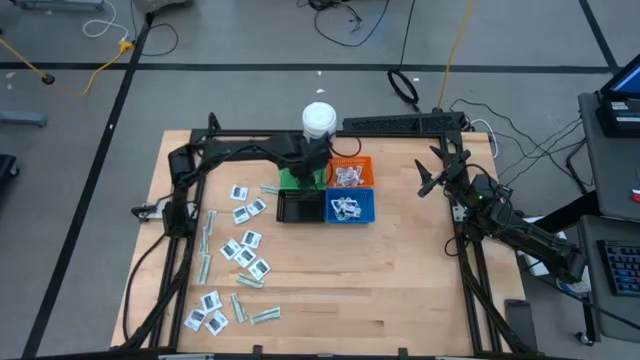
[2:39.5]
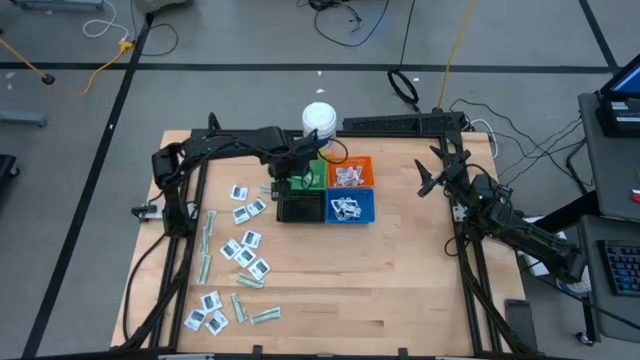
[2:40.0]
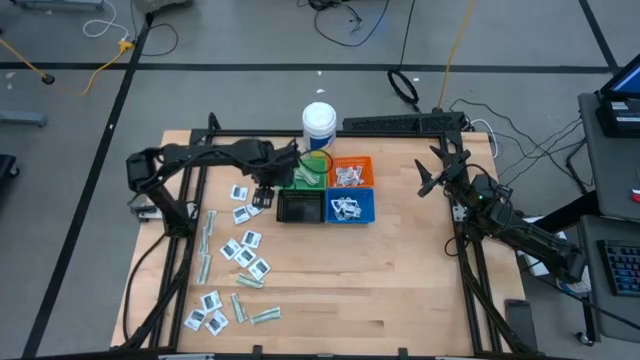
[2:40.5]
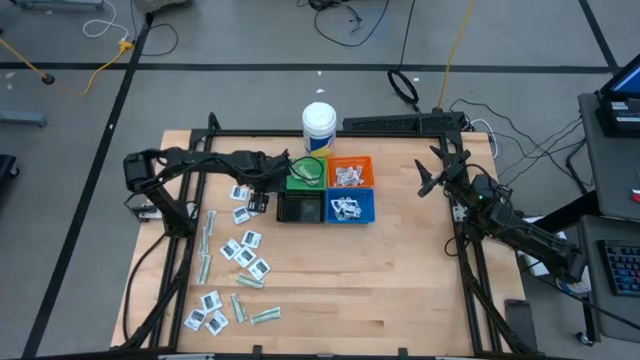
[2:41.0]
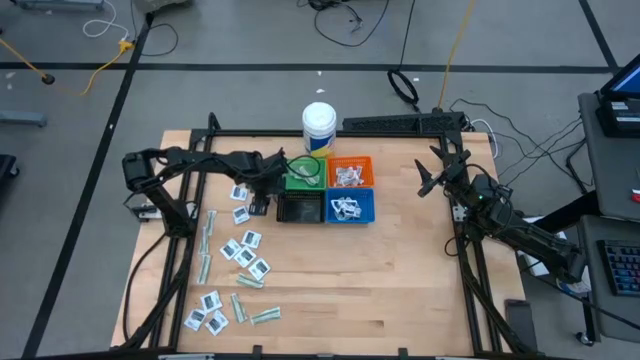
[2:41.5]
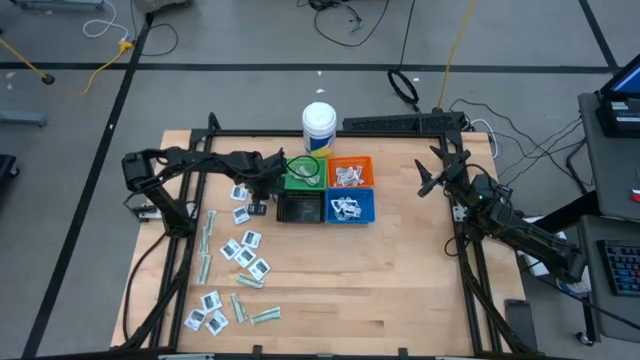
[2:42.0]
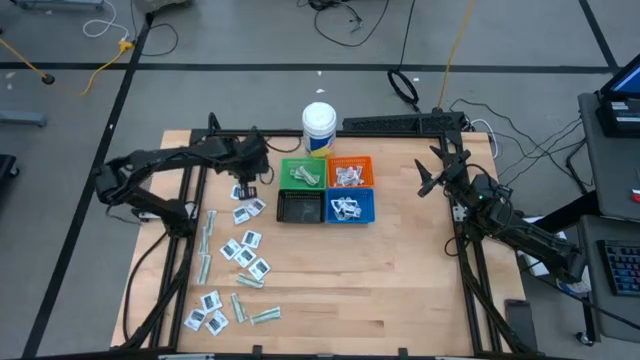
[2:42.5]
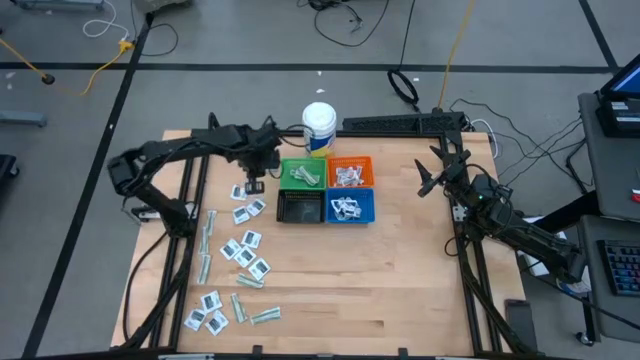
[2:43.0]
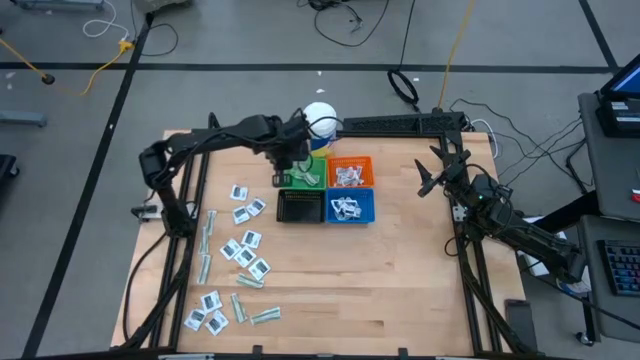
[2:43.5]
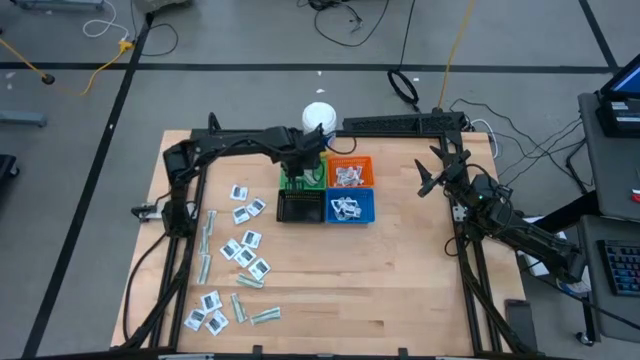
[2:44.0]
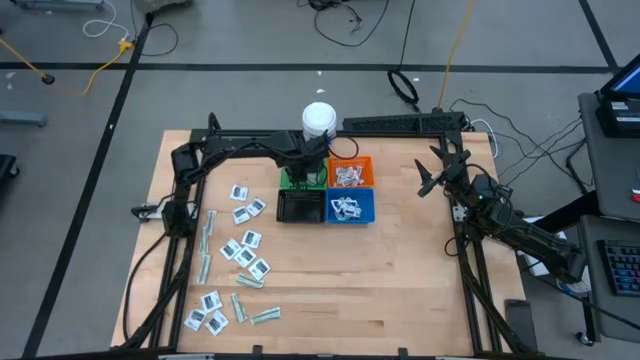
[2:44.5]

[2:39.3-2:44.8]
Task: Pick & Place First Aid Supplies
Put the green bandage pad into the green basket

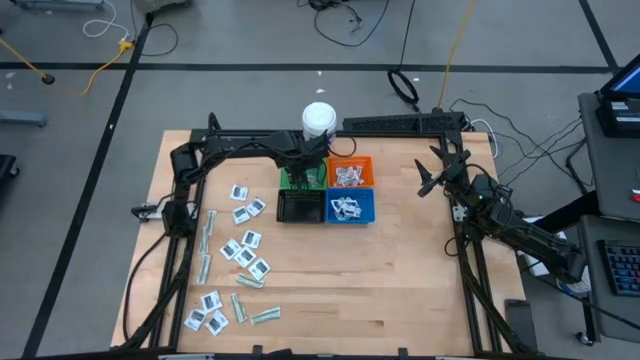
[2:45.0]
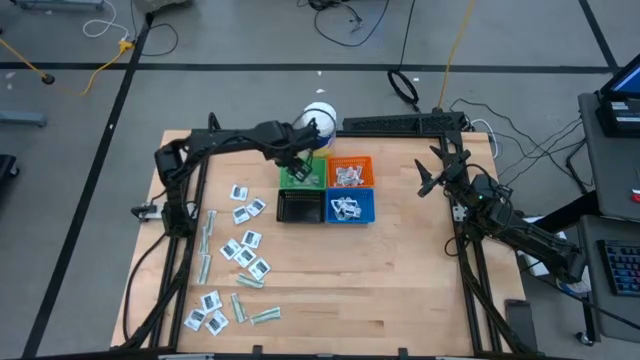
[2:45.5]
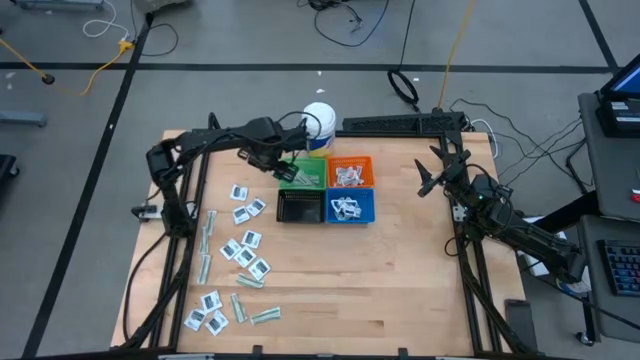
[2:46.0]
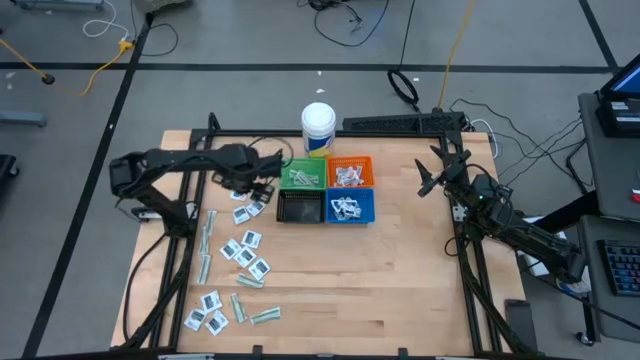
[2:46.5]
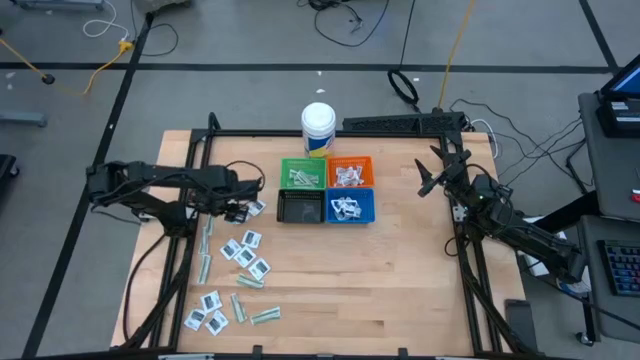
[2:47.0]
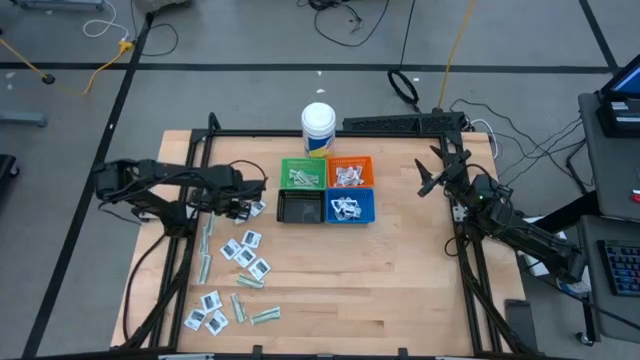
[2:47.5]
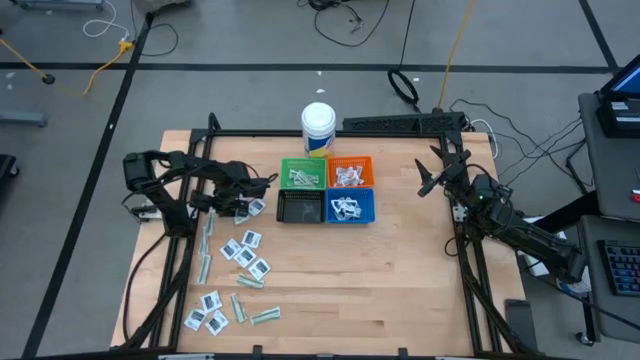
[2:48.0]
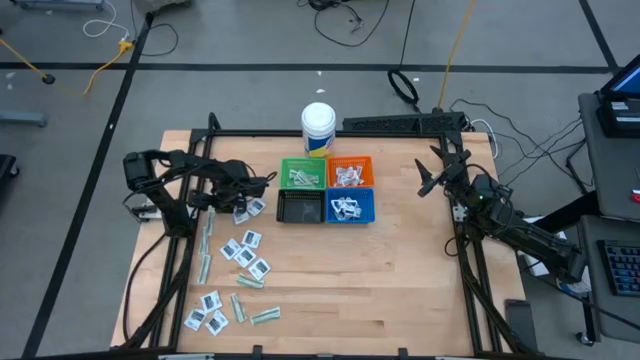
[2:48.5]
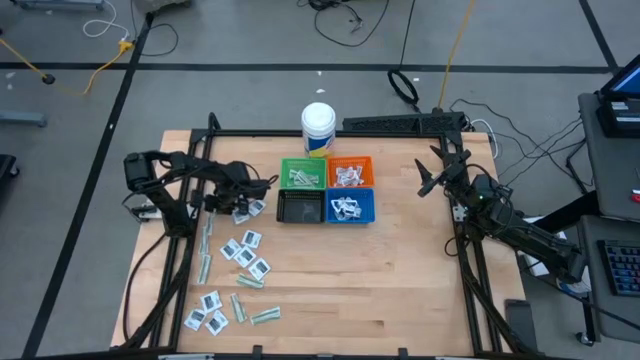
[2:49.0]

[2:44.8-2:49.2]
Put the green bandage pad into the green basket

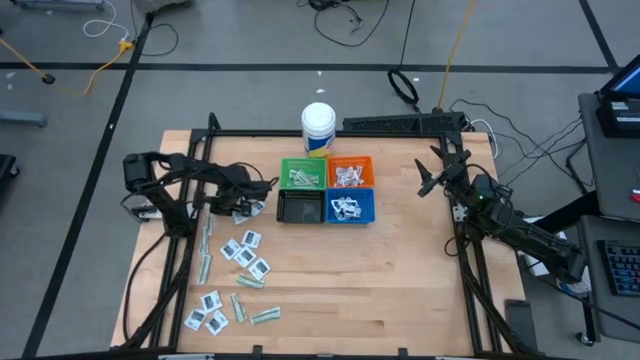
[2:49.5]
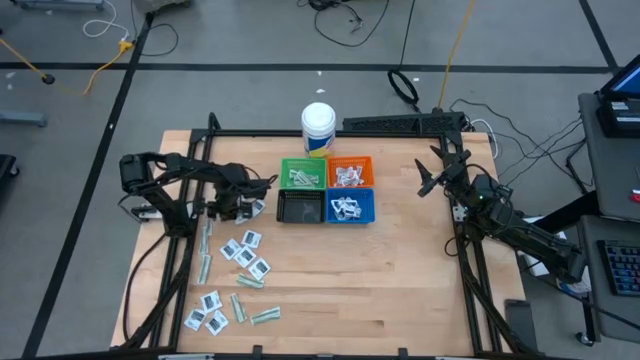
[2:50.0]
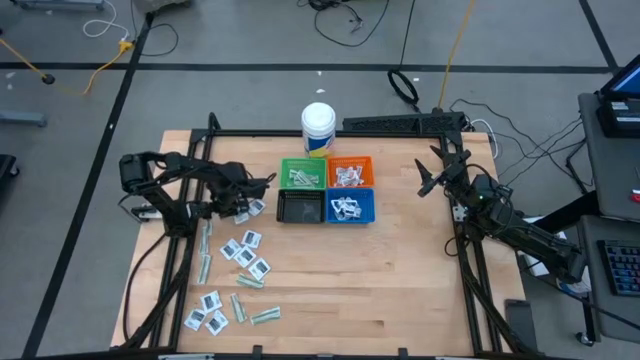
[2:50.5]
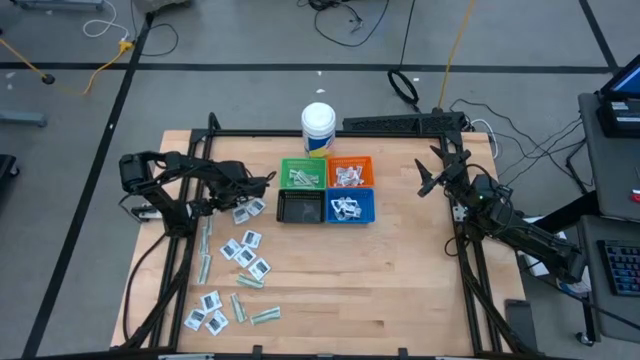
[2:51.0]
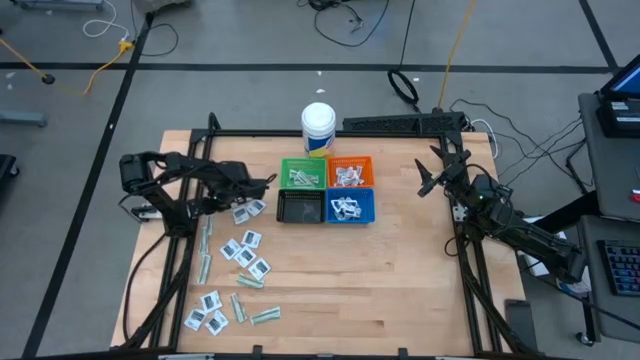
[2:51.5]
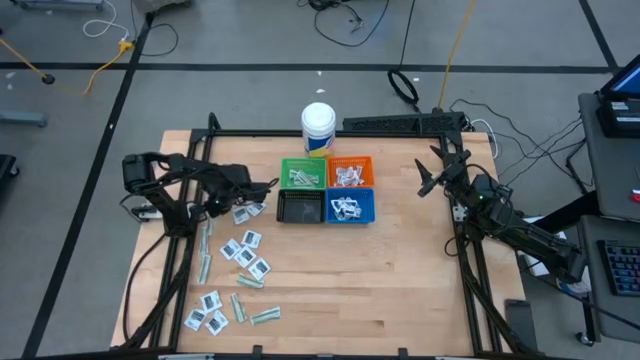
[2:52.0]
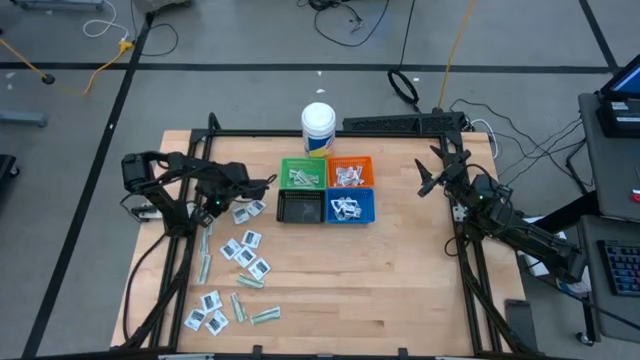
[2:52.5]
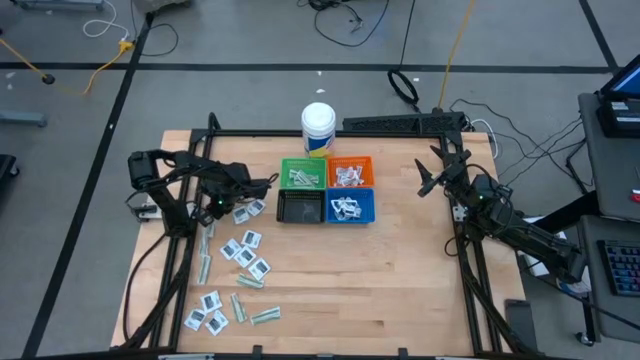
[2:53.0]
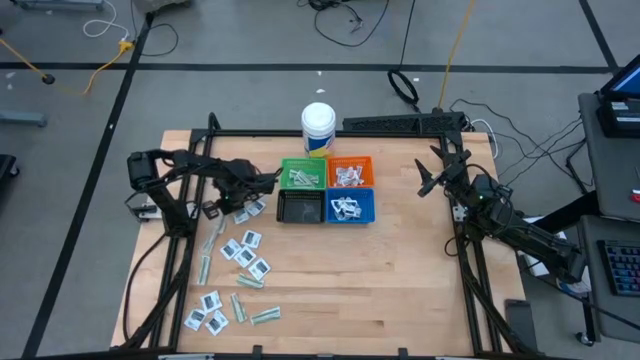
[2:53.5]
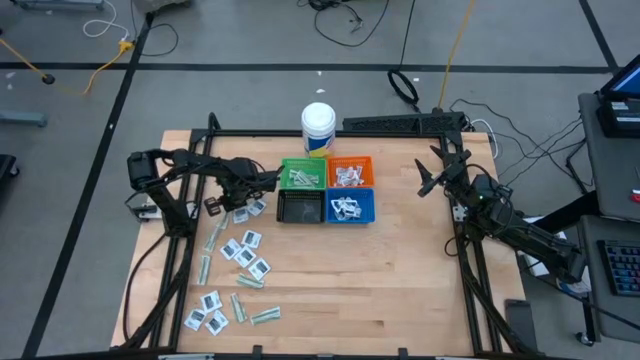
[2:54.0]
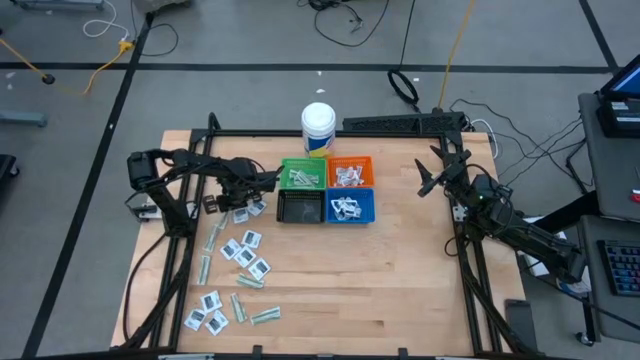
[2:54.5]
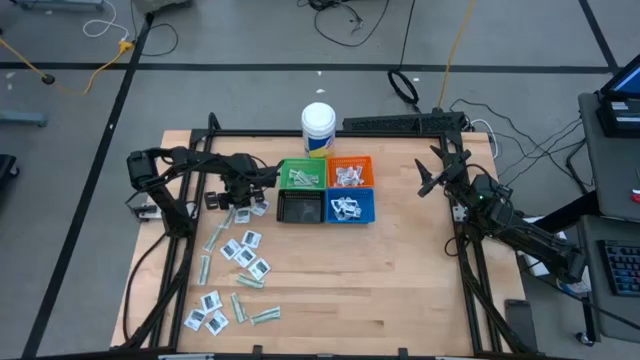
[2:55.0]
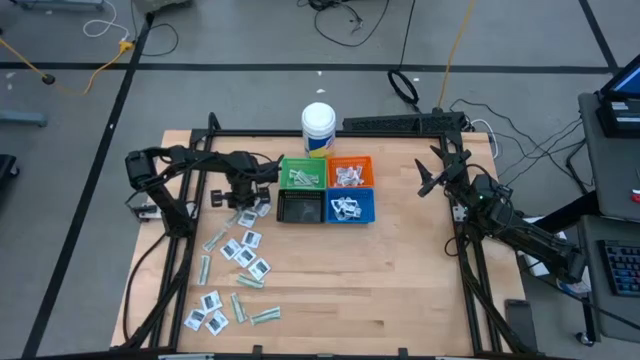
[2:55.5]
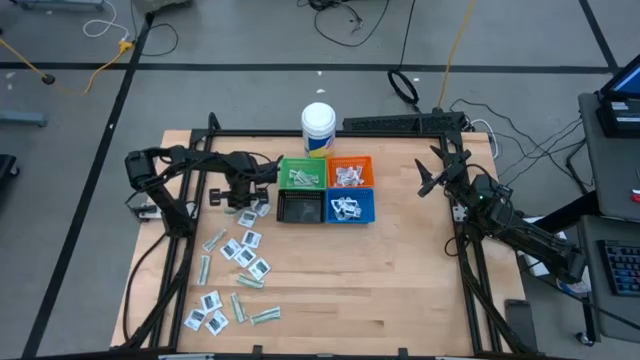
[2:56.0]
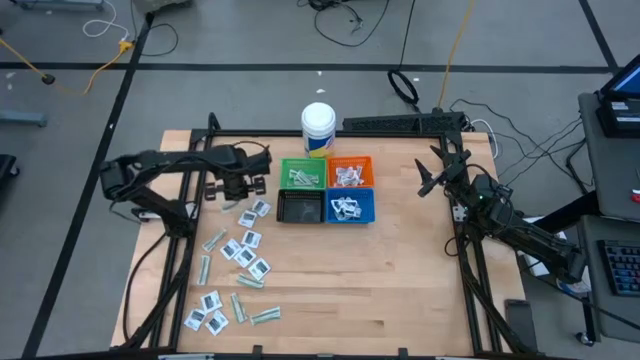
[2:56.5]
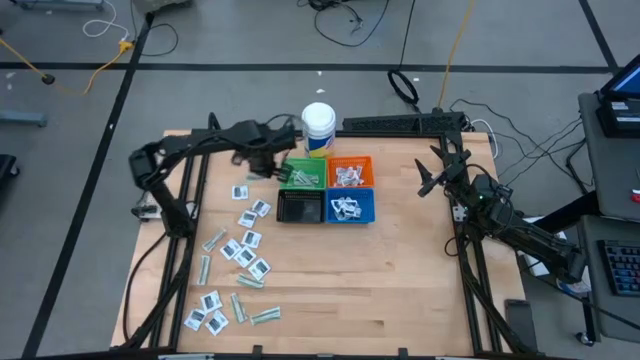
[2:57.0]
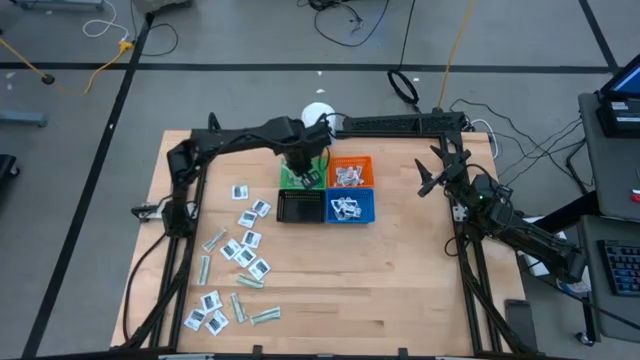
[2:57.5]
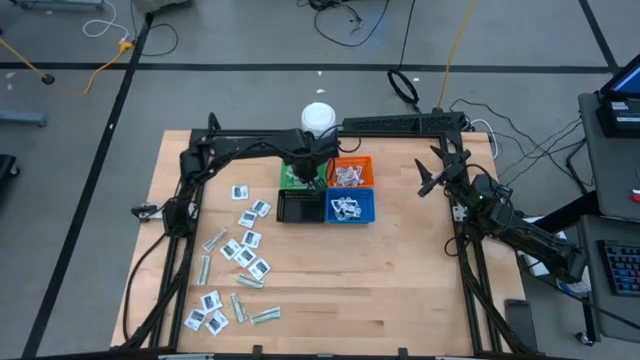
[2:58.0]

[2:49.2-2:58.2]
Put the green bandage pad into the green basket

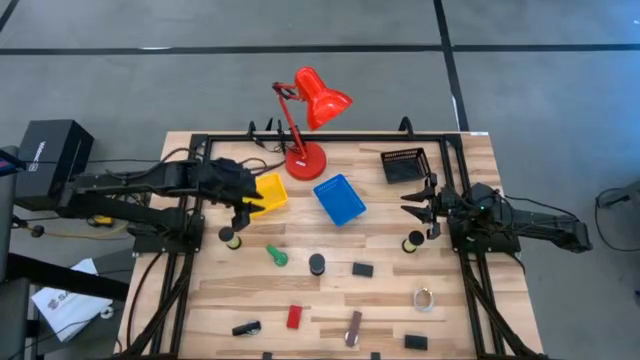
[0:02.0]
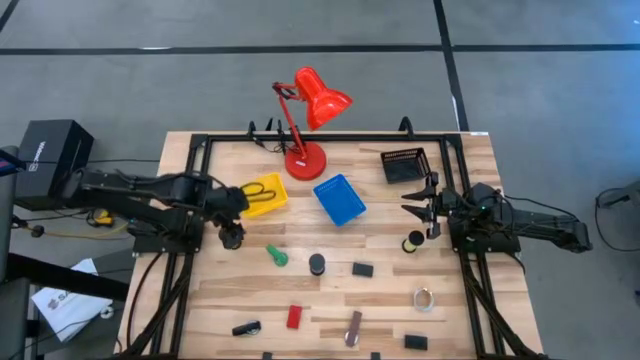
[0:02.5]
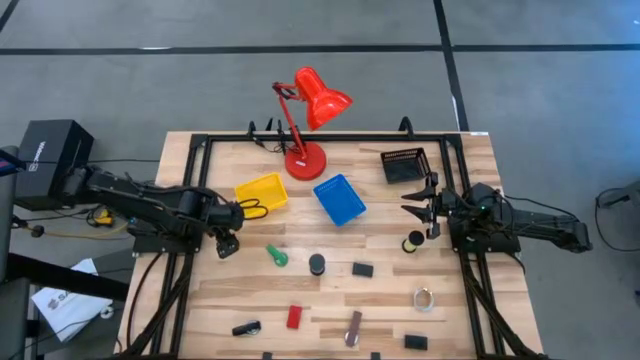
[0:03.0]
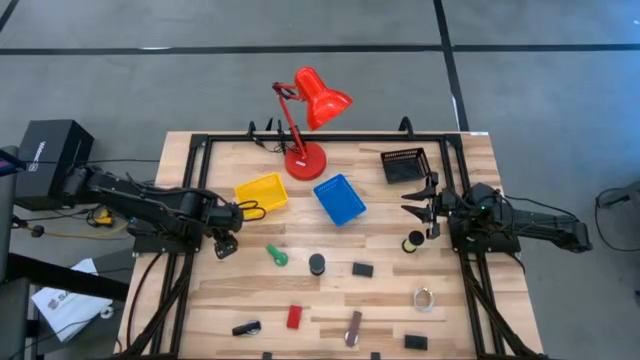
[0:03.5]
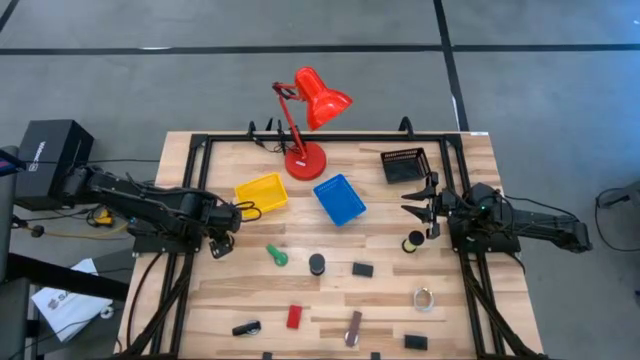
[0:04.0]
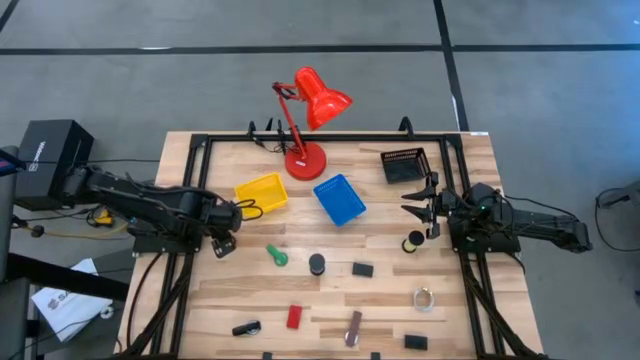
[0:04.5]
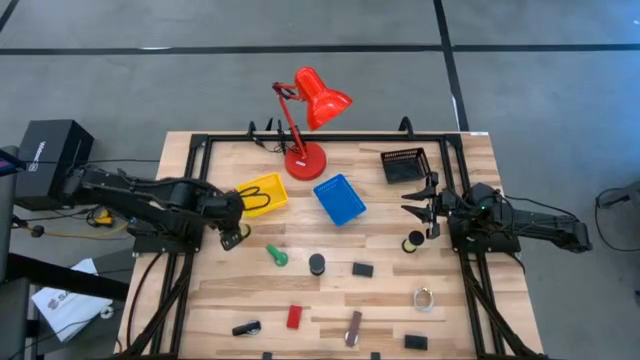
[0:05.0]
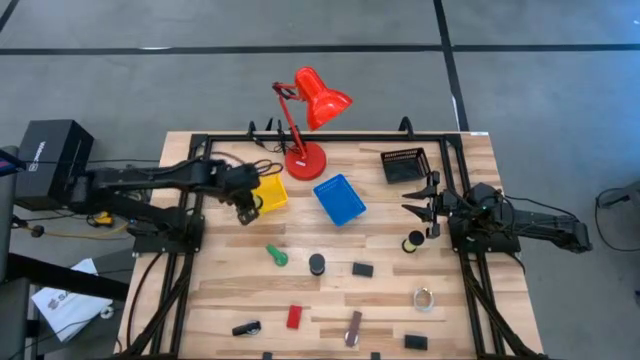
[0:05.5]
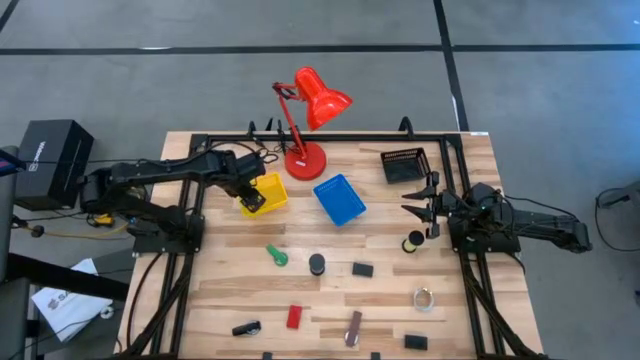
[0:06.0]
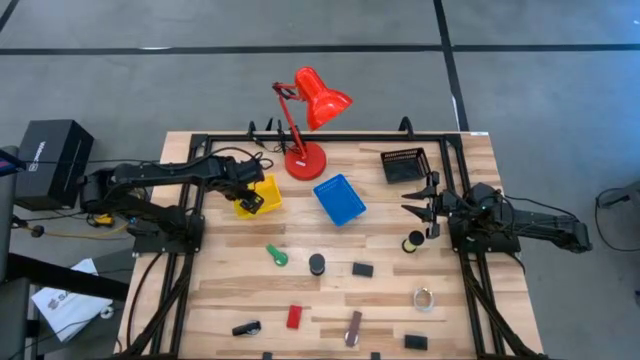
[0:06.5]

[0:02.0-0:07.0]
Task: Pick & Place Office items
Put the left light green hourglass into the yellow bin
